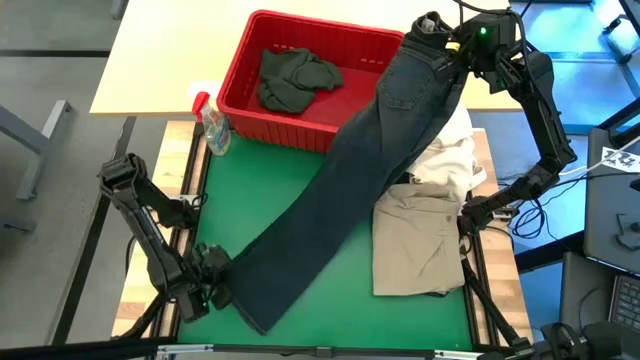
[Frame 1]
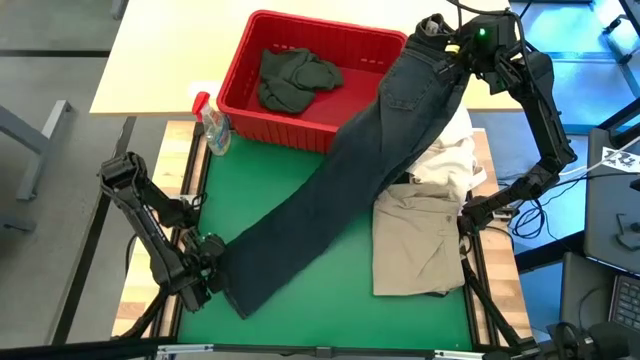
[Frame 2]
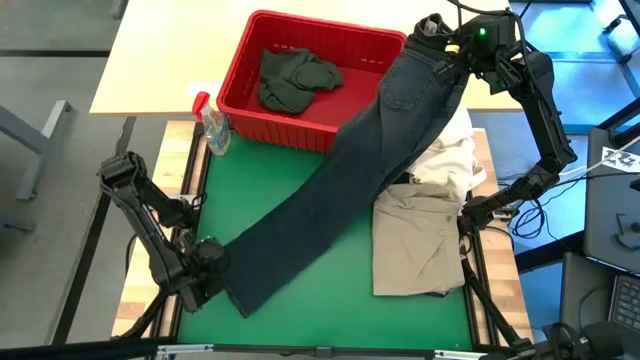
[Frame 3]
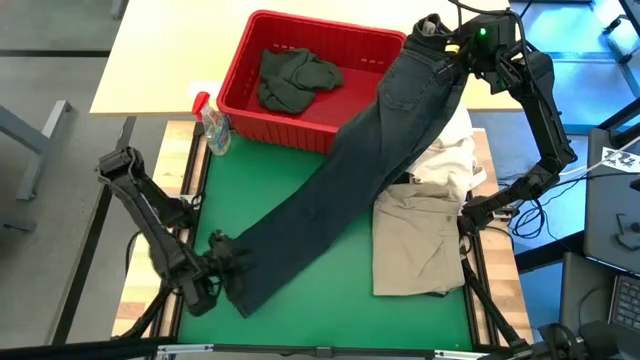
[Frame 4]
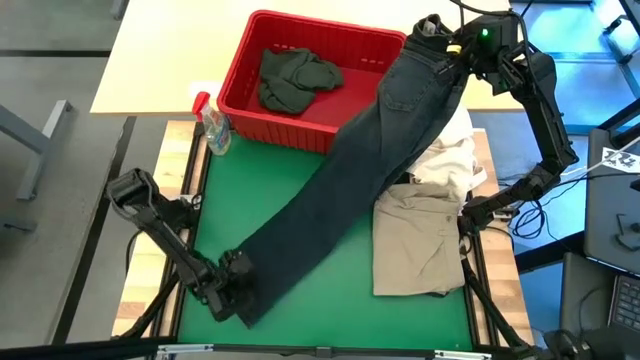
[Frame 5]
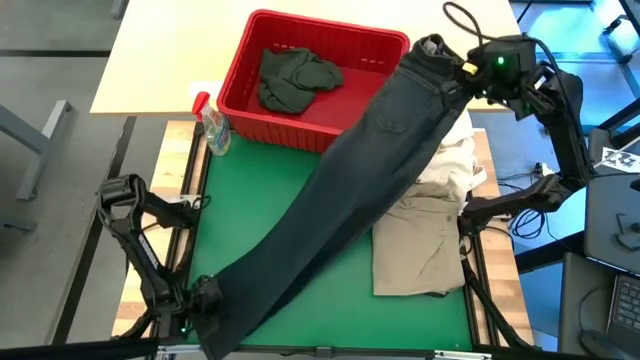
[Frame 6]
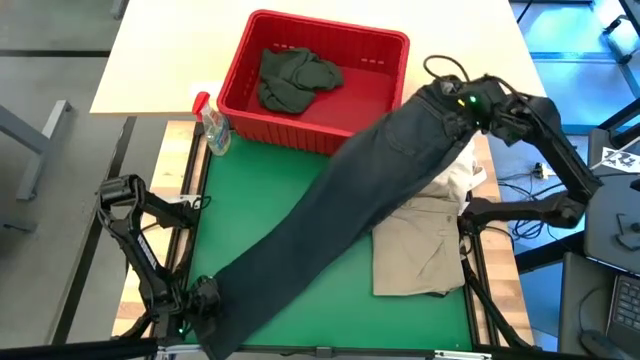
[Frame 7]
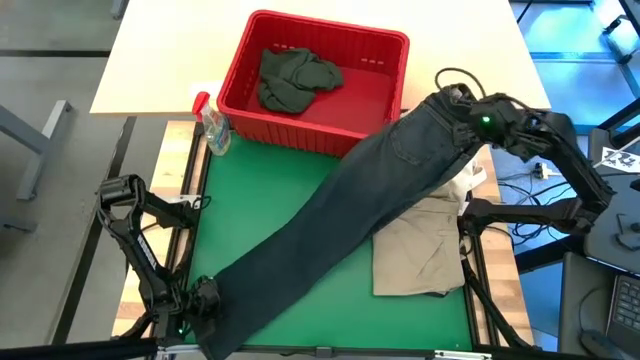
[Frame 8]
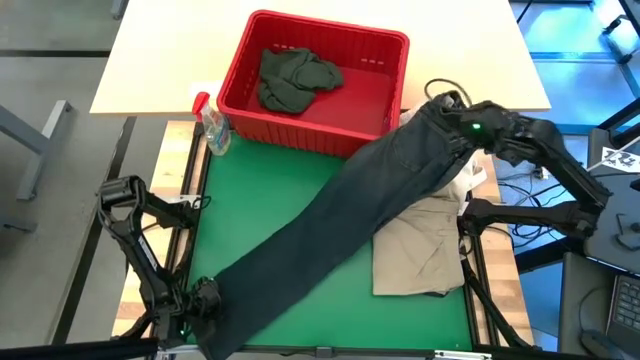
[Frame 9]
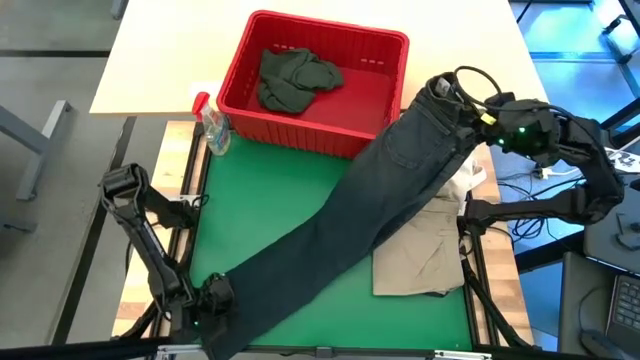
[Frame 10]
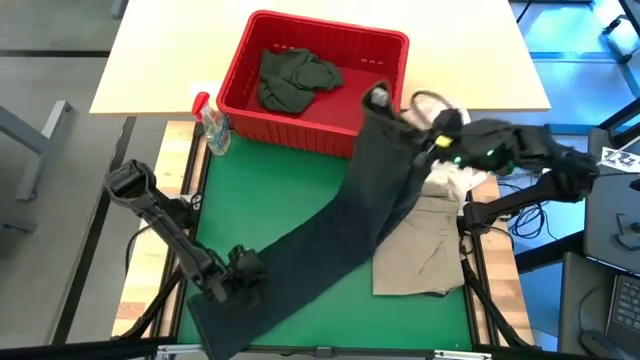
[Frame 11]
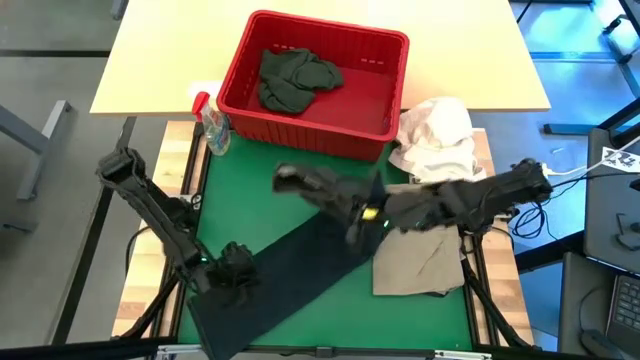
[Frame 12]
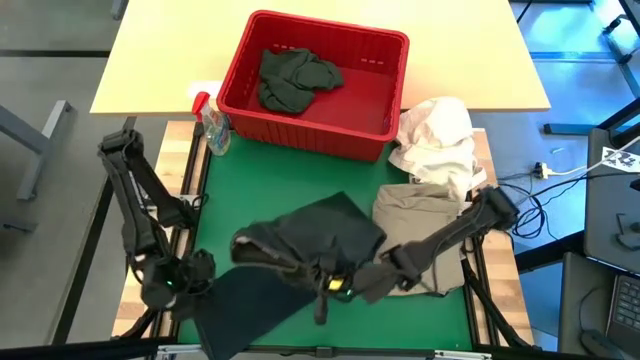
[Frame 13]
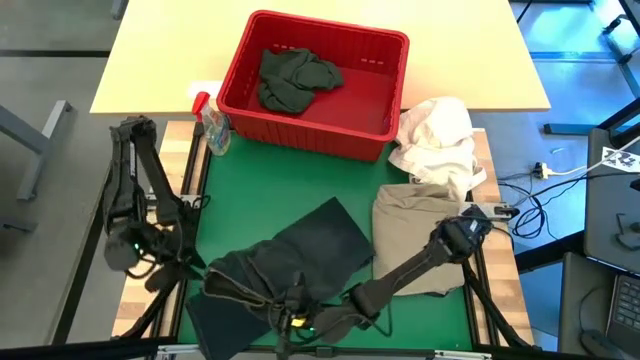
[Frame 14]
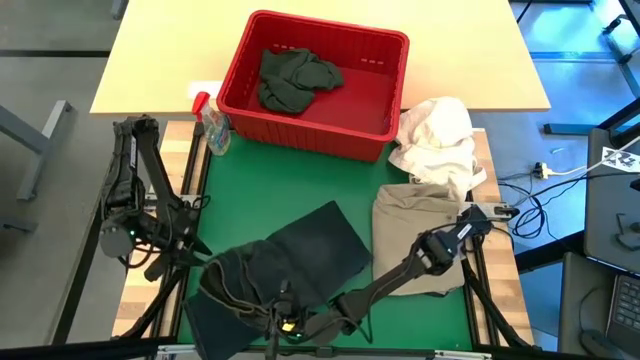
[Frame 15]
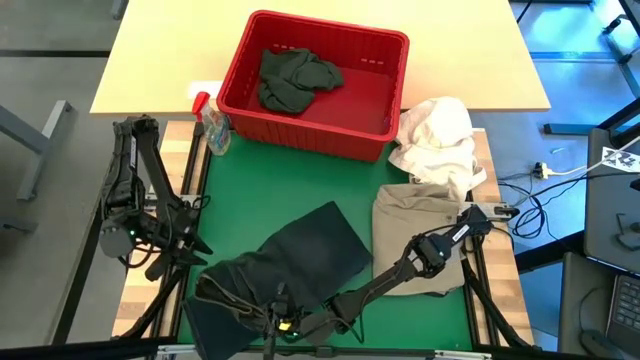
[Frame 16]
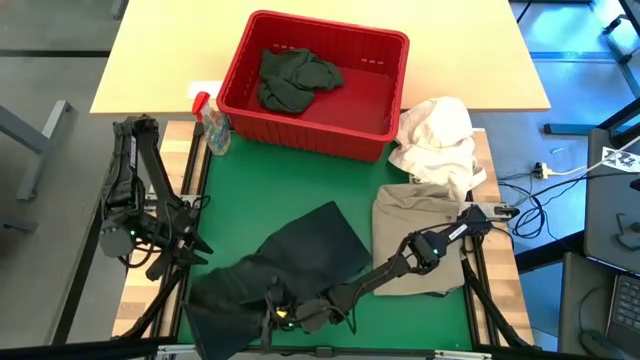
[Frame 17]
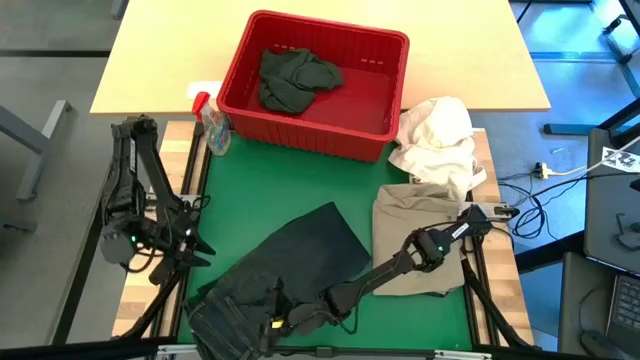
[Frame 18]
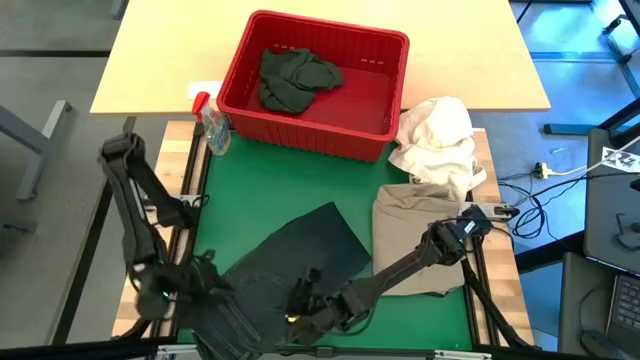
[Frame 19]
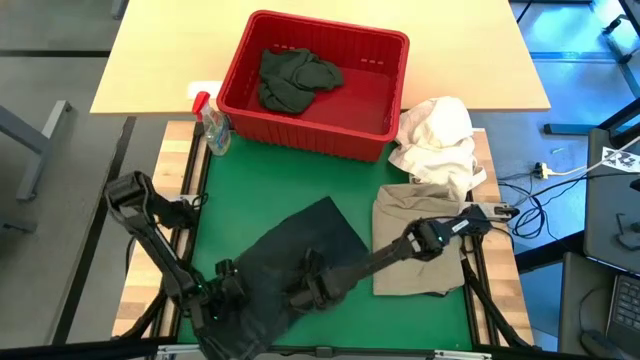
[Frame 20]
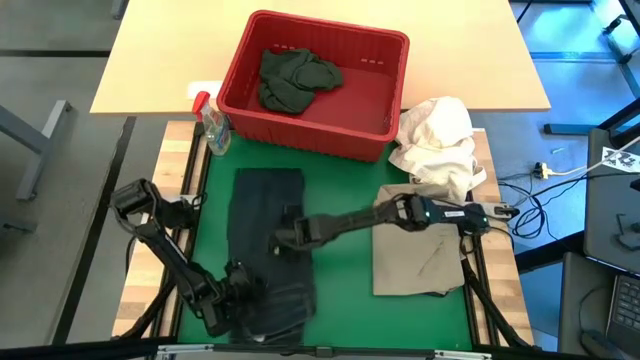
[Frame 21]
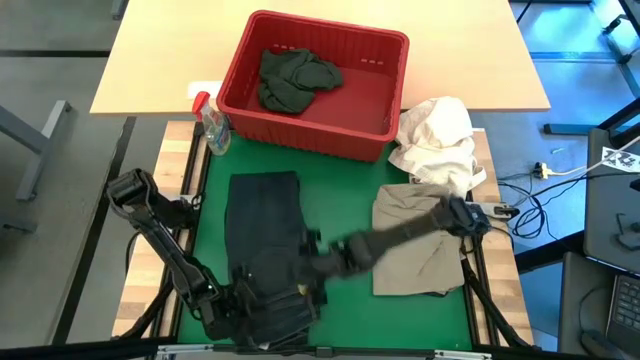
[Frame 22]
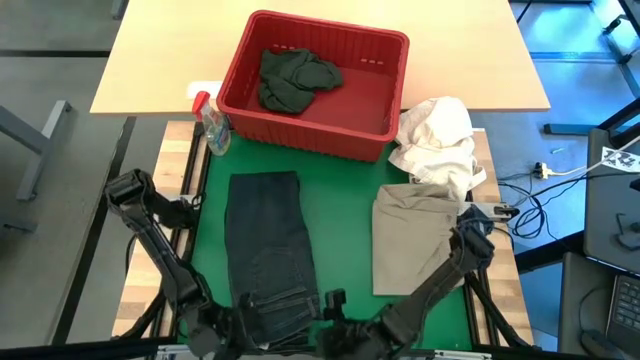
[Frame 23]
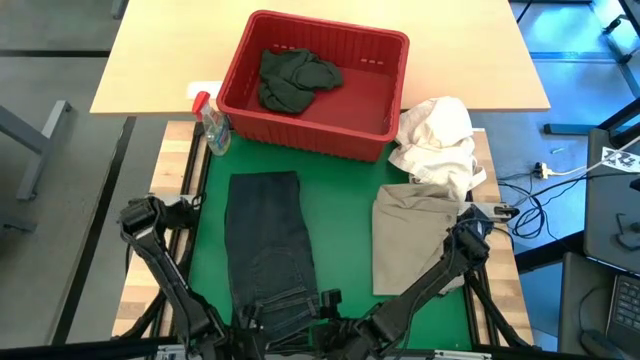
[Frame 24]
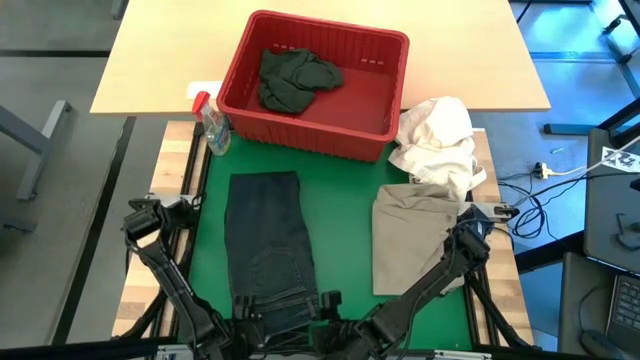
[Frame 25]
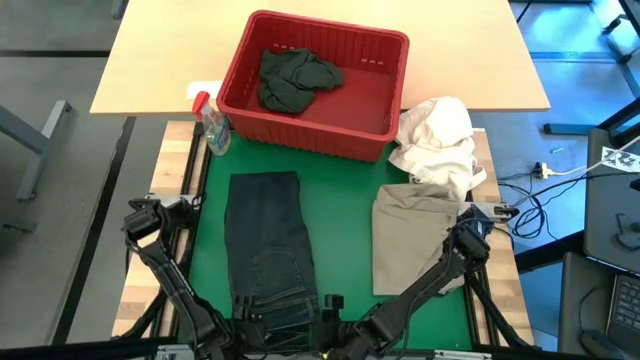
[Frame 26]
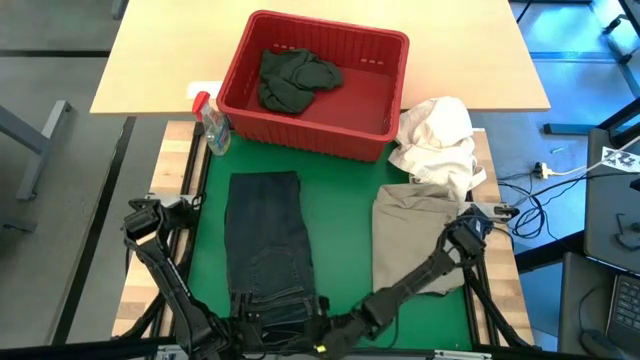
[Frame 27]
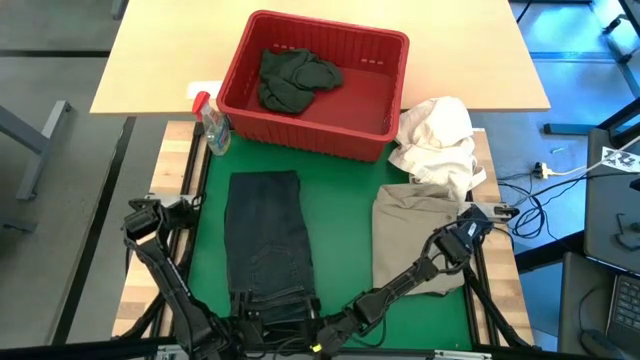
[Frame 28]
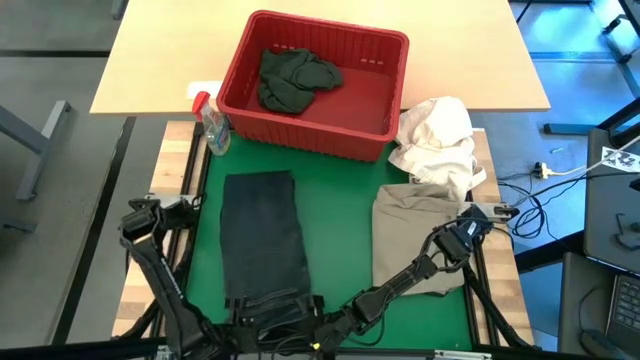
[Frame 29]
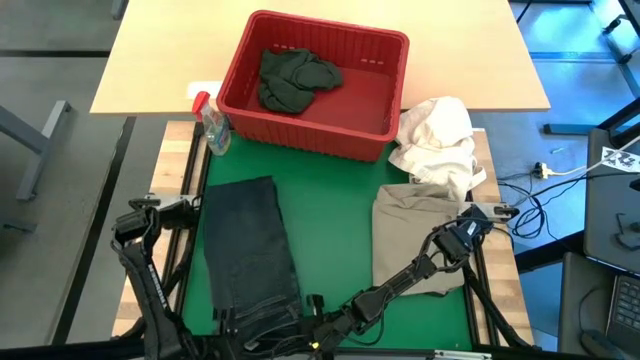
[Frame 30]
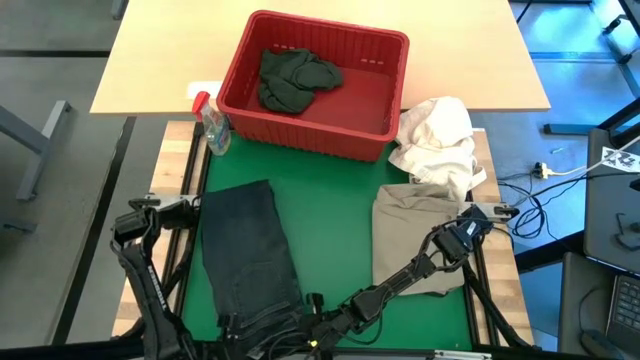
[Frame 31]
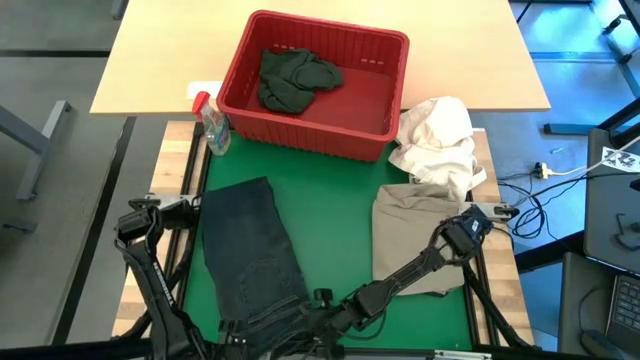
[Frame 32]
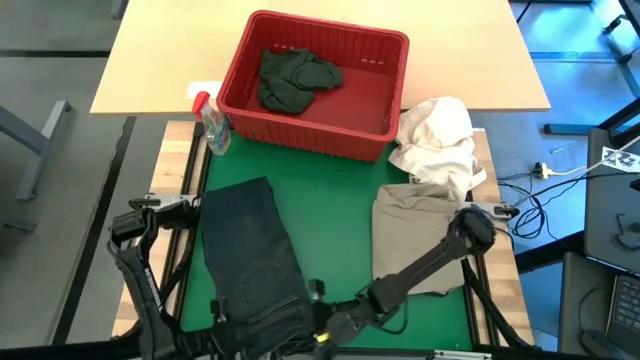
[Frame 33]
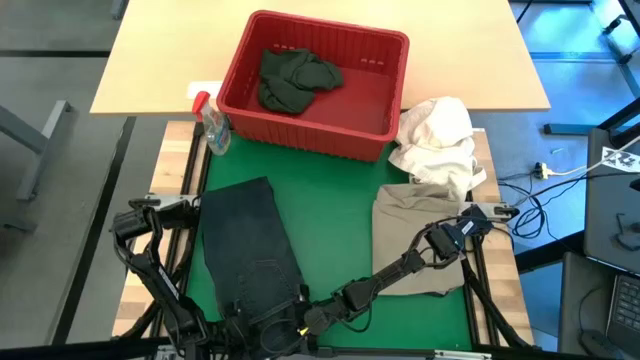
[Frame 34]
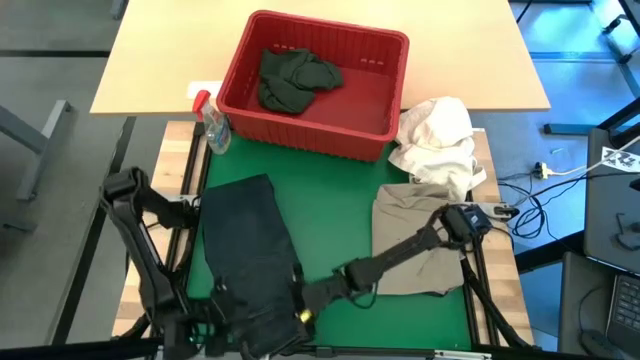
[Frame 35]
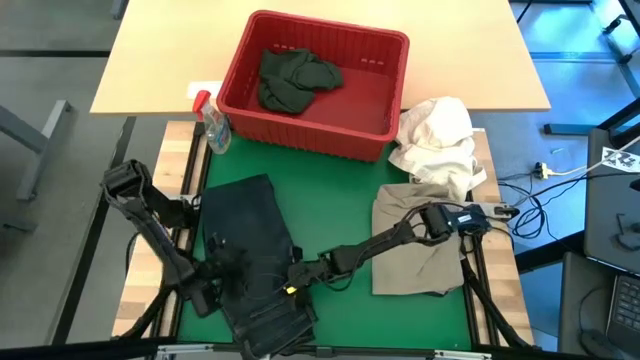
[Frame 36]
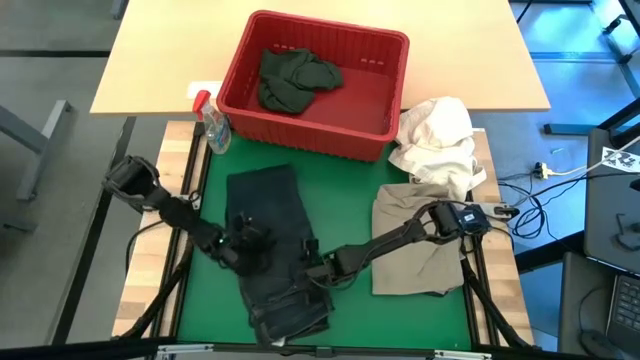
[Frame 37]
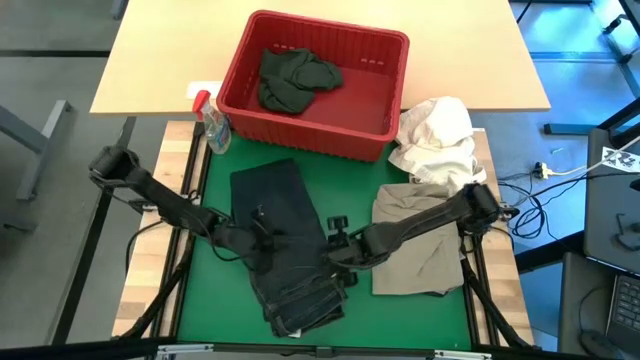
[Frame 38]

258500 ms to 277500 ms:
Task: Fold Laundry from Bin
Fold the blue pants

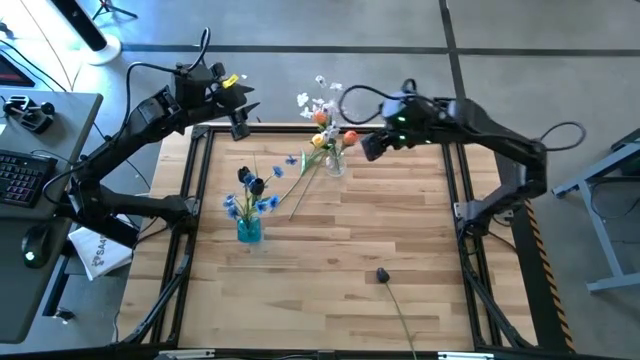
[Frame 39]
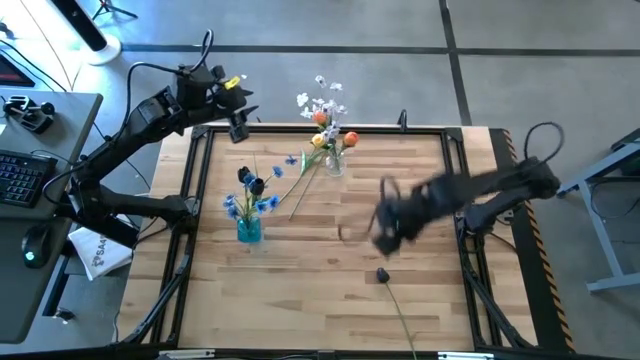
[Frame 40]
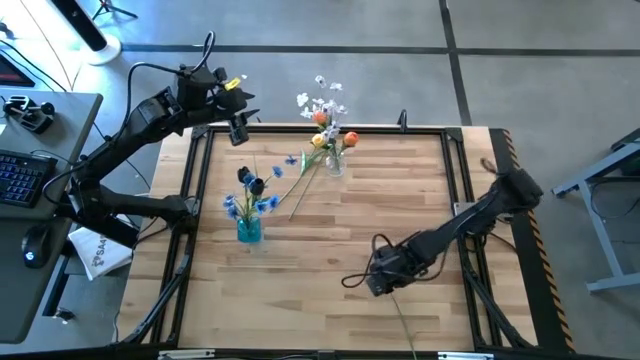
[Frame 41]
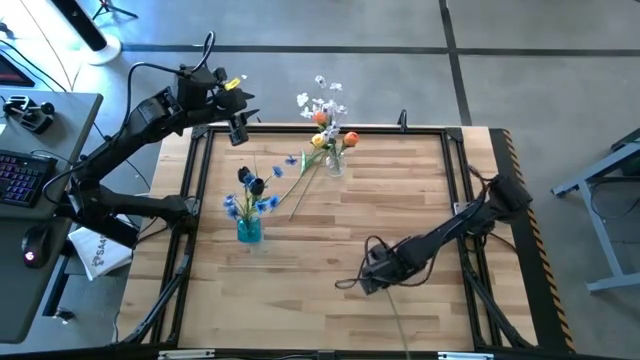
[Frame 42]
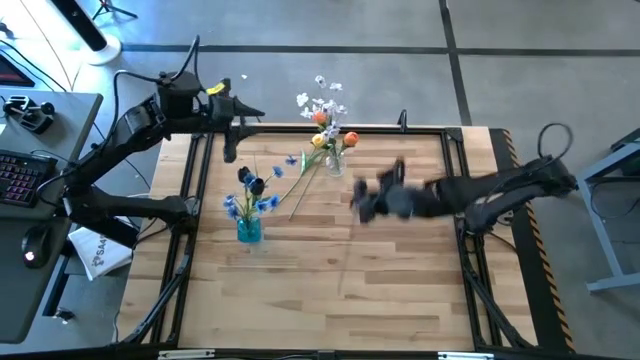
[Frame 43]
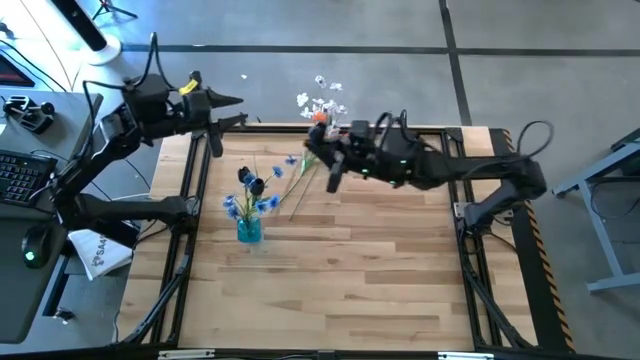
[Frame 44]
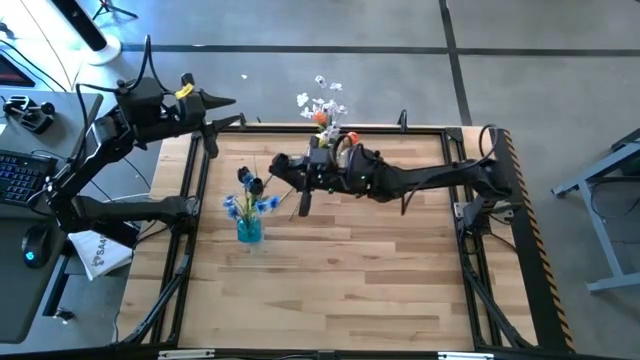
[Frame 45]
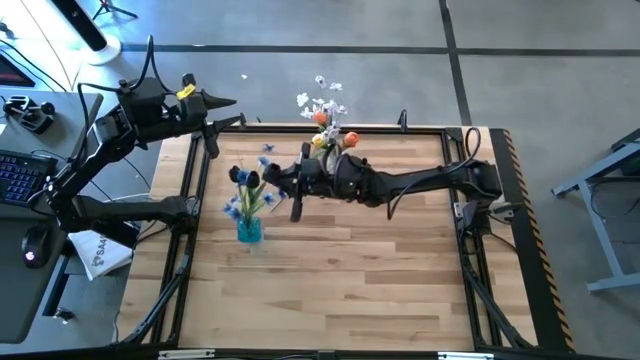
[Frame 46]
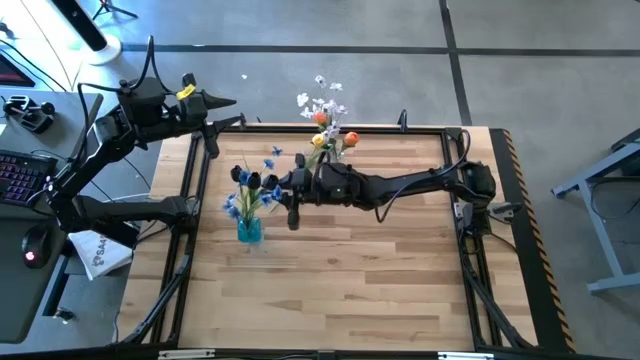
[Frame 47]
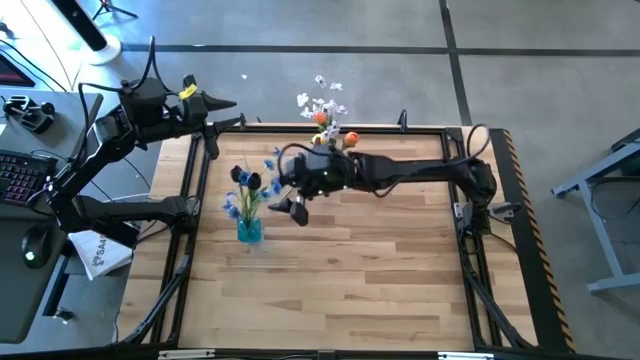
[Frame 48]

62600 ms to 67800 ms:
Task: Sort flowers into vase by color
Put the bottom black flower into the blue vase
